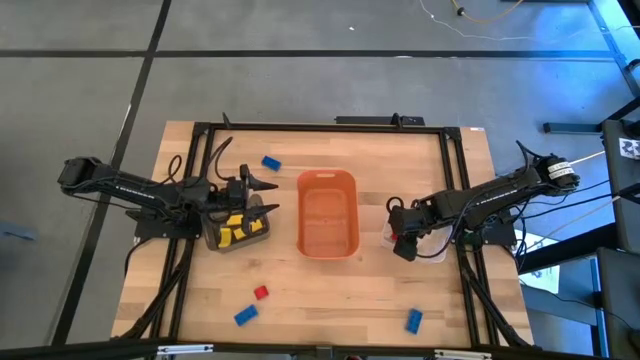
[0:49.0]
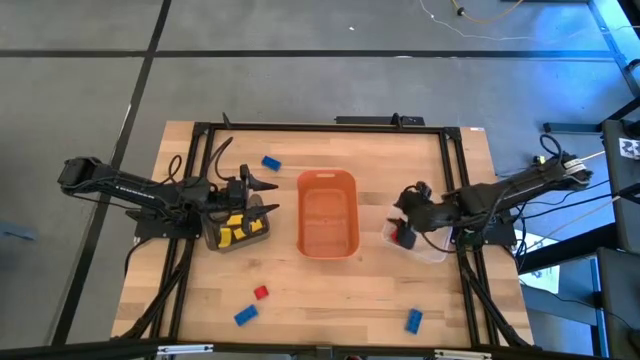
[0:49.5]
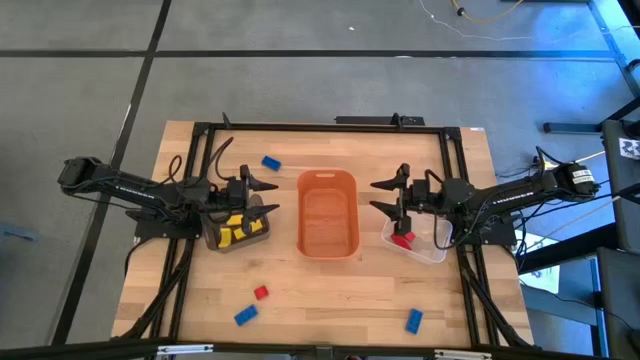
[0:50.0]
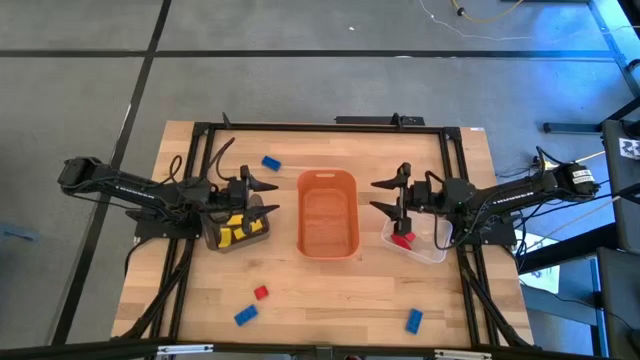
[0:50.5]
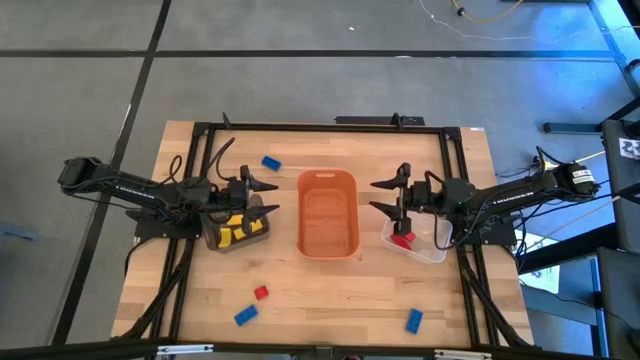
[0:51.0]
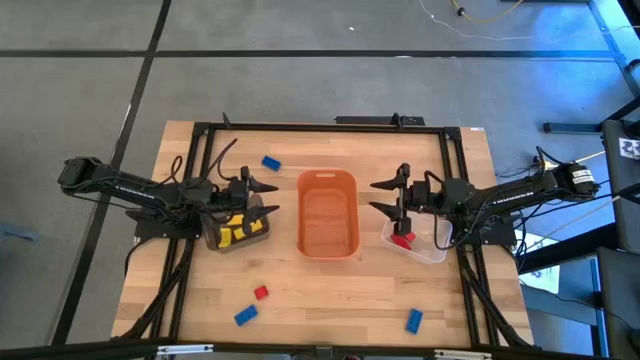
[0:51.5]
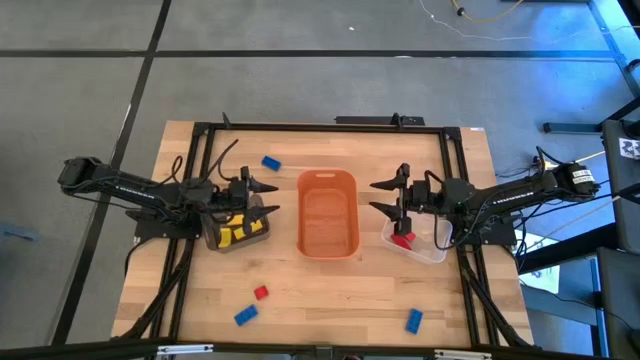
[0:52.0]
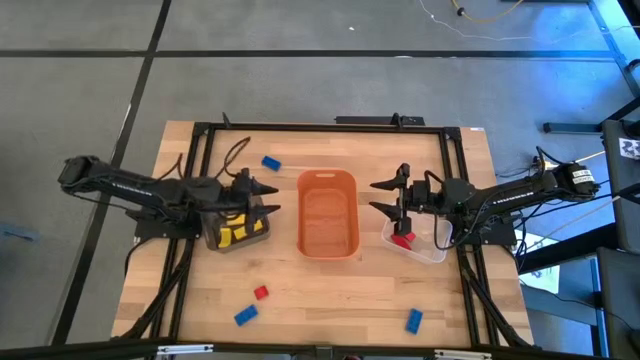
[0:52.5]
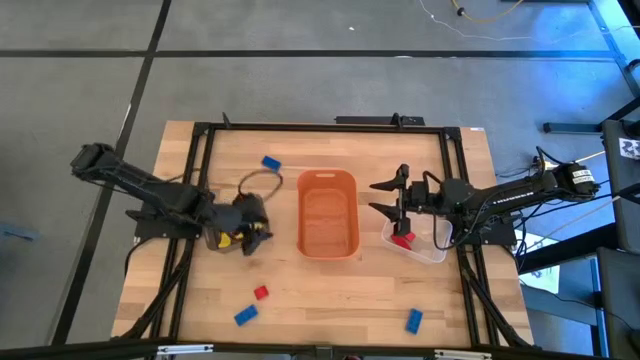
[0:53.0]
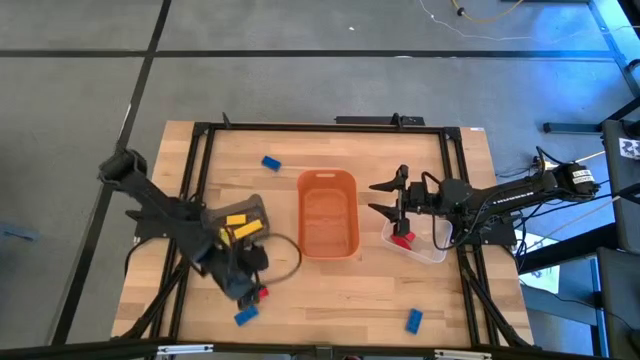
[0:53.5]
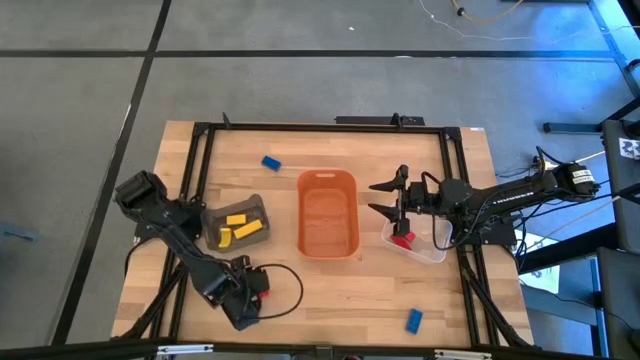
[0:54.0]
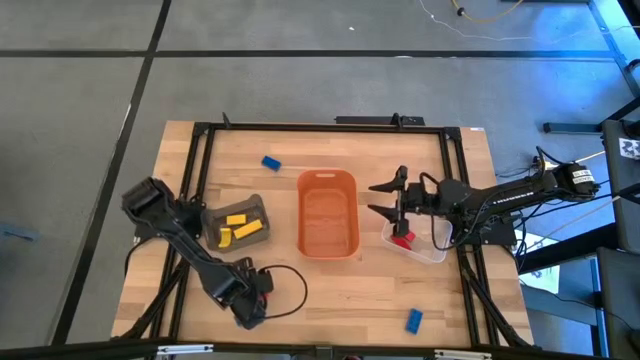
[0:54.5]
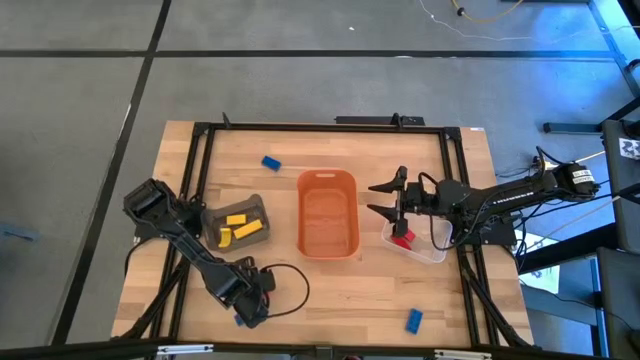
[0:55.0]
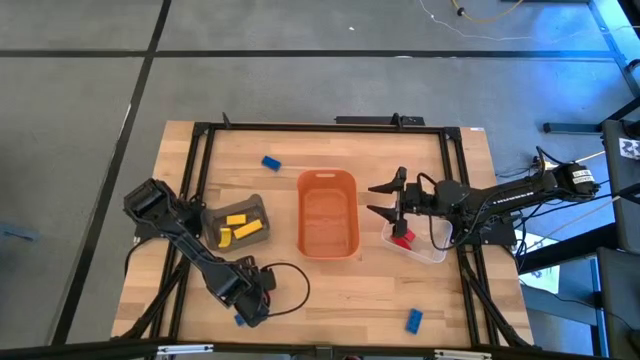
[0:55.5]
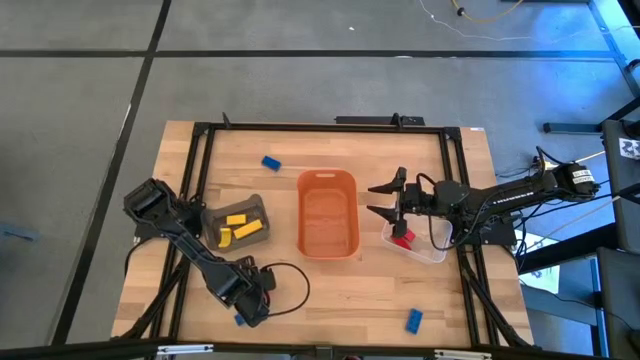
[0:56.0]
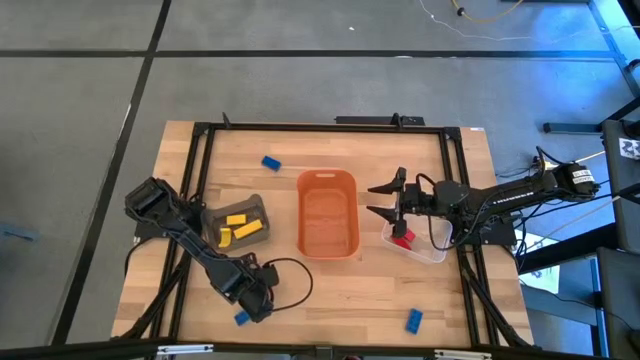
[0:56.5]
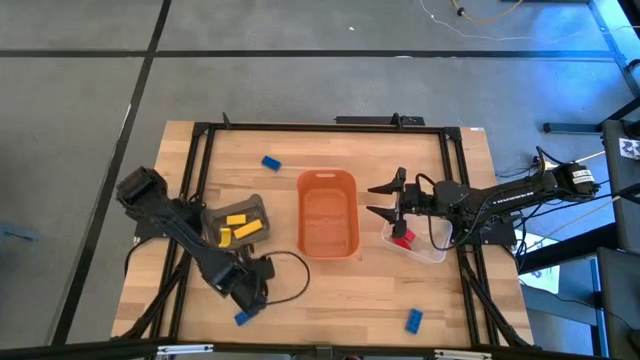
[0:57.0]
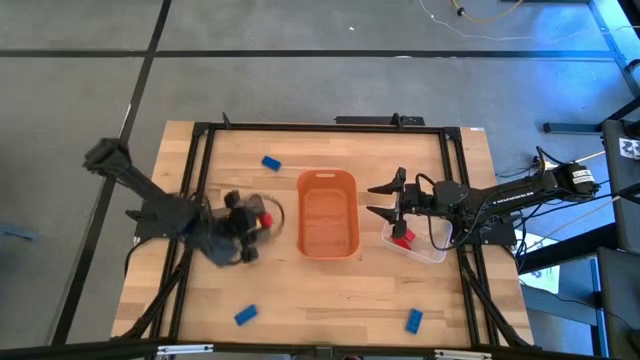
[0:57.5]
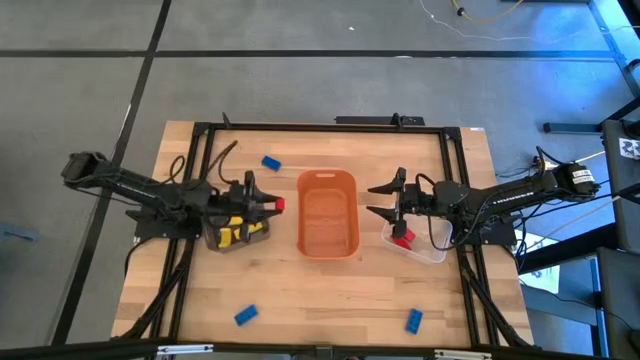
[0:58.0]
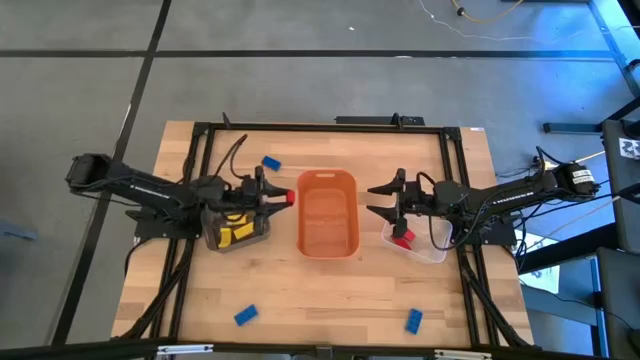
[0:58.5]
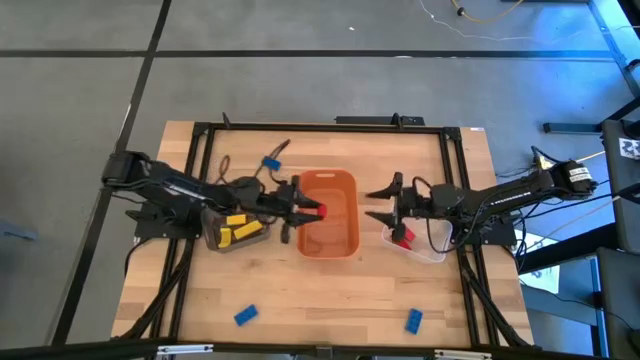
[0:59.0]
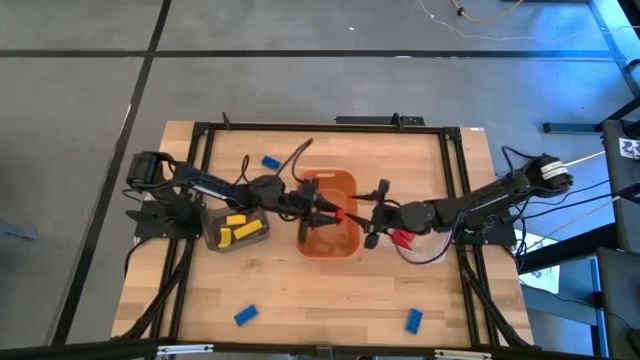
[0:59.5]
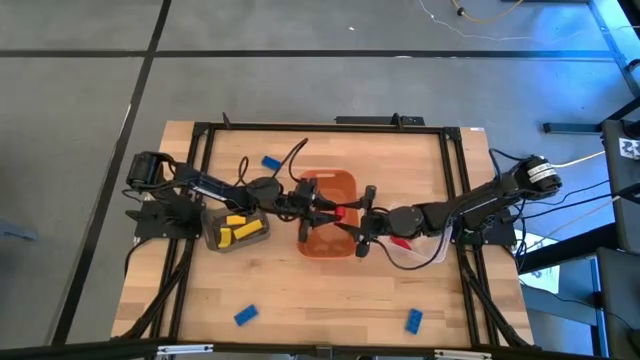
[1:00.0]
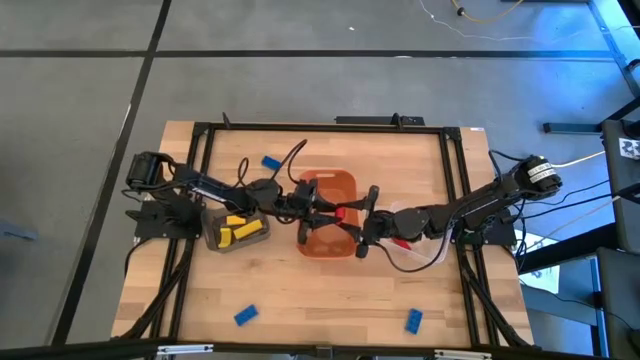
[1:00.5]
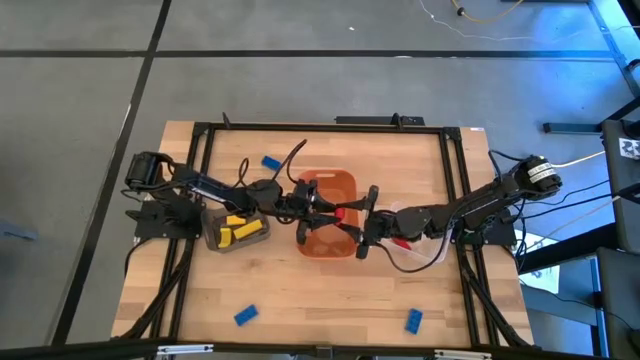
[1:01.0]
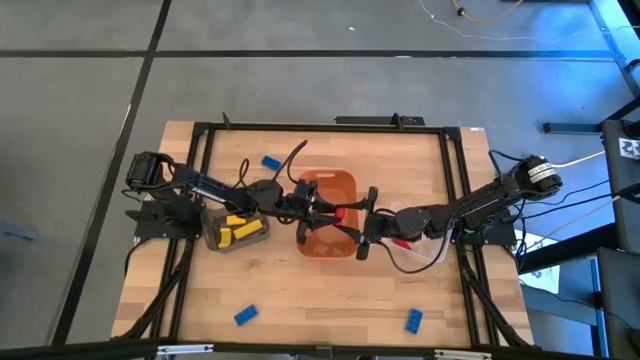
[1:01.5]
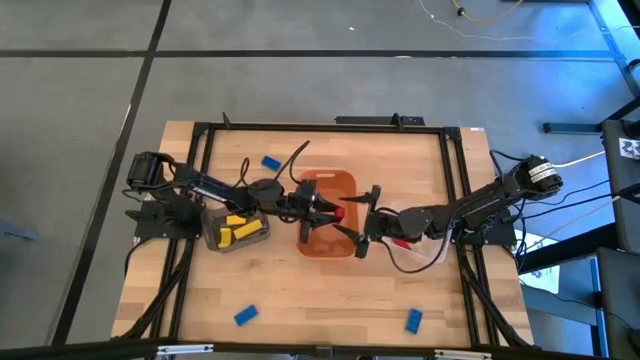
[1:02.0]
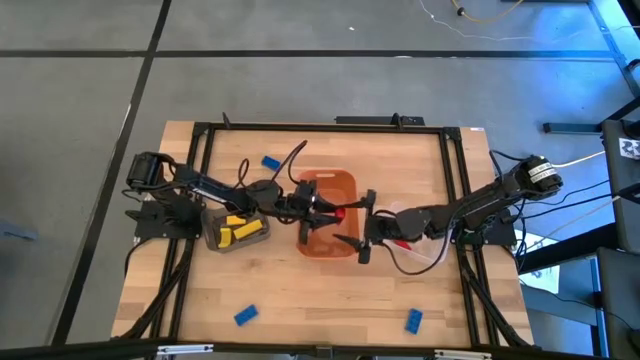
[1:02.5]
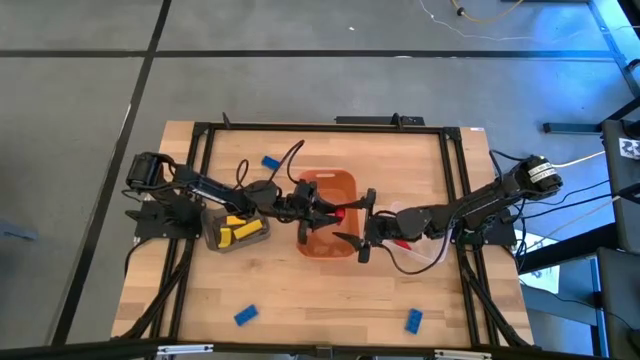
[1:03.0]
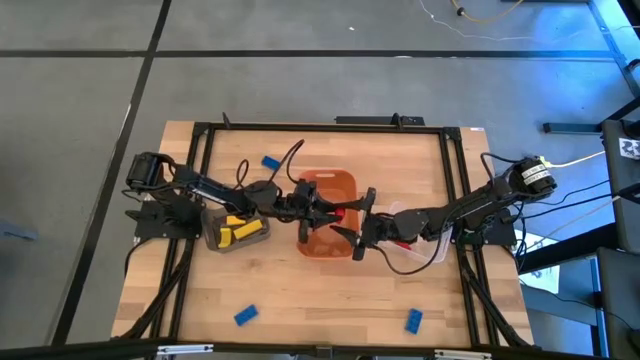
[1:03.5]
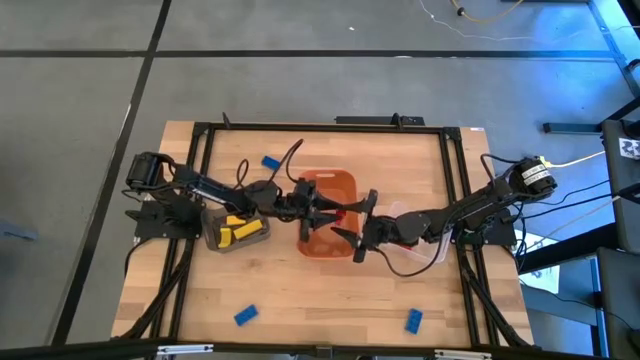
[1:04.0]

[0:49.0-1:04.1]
Task: Sort & place blocks by color
Put the red block into the transparent bin

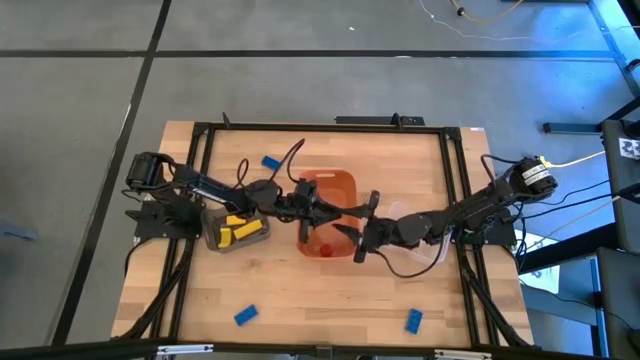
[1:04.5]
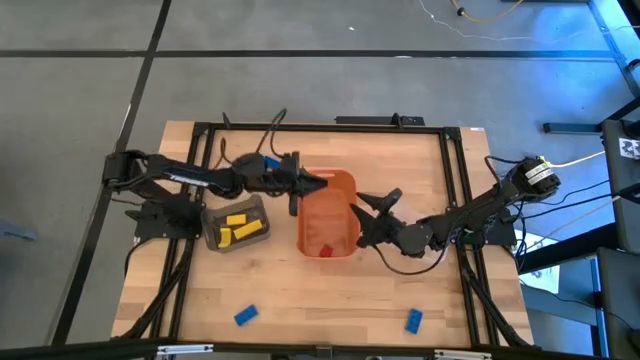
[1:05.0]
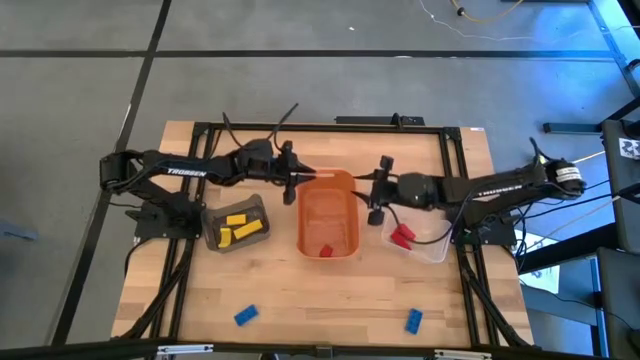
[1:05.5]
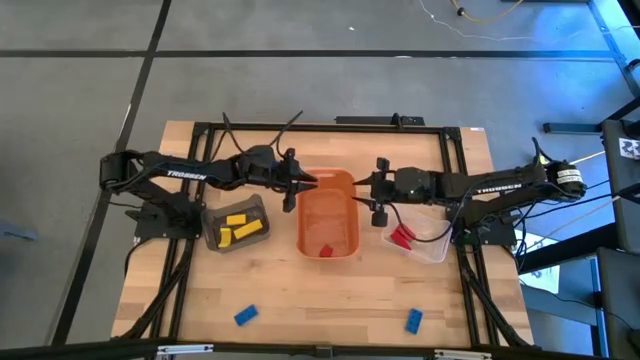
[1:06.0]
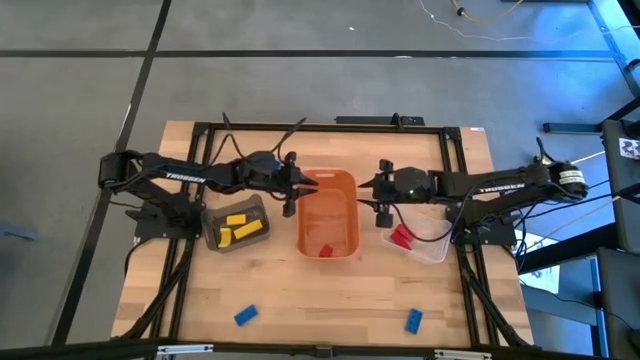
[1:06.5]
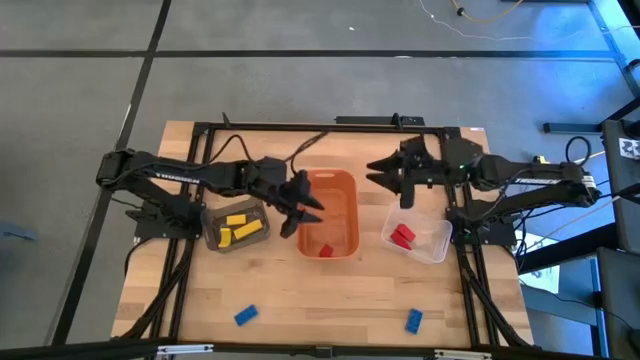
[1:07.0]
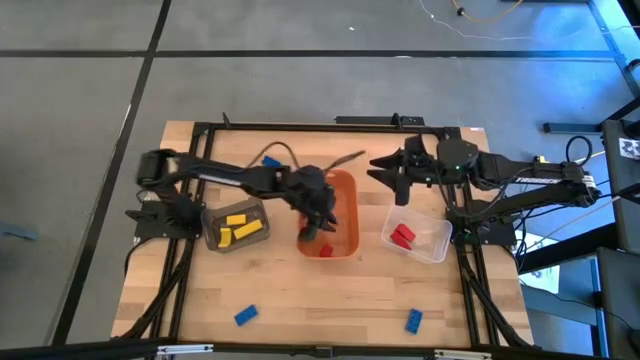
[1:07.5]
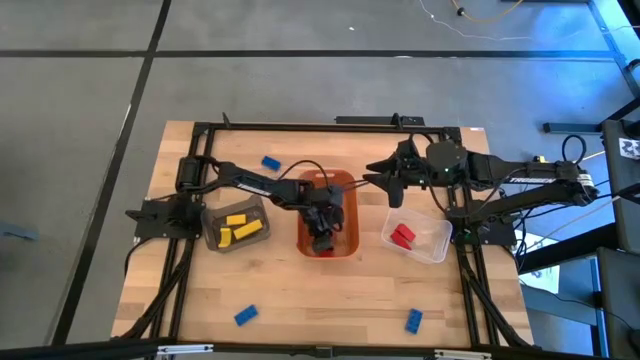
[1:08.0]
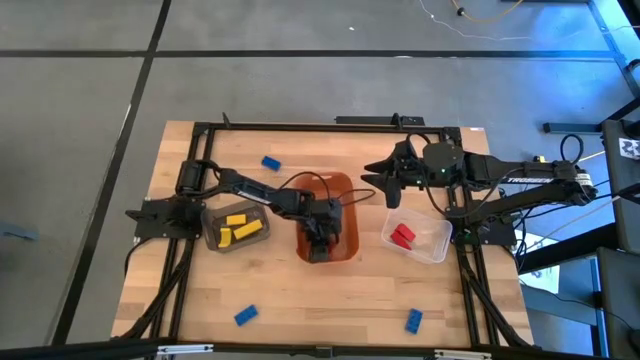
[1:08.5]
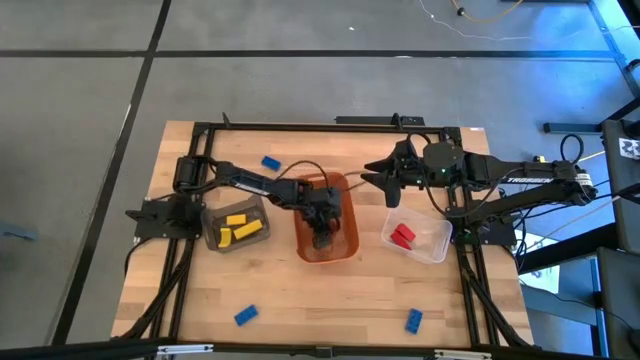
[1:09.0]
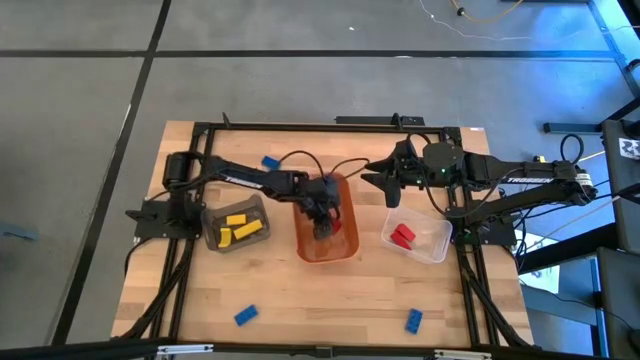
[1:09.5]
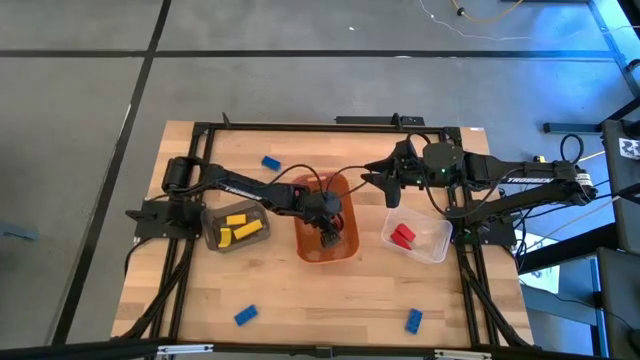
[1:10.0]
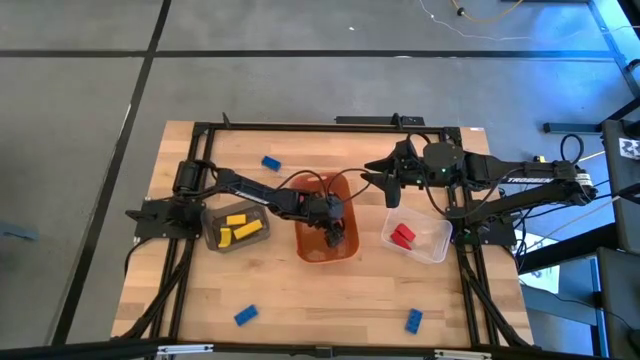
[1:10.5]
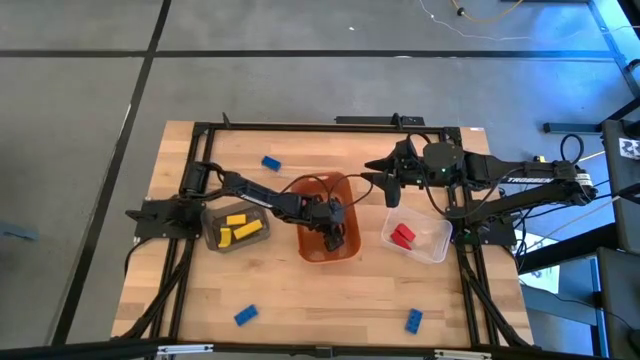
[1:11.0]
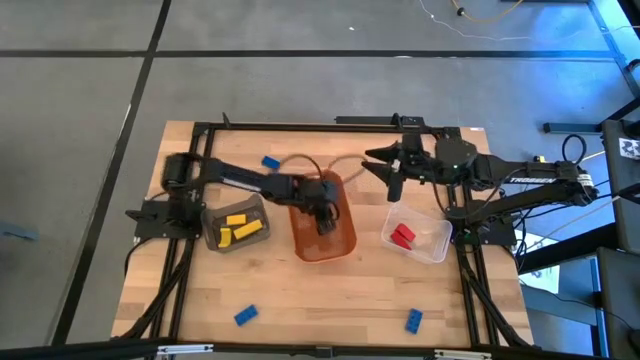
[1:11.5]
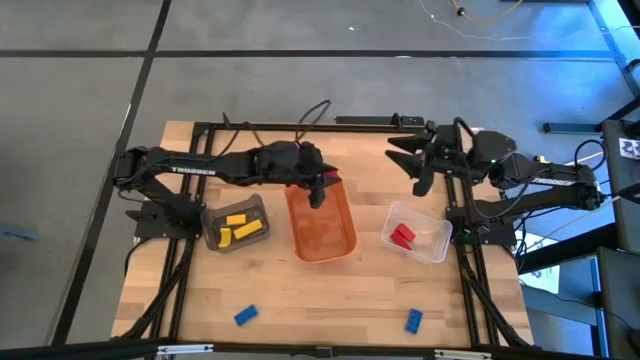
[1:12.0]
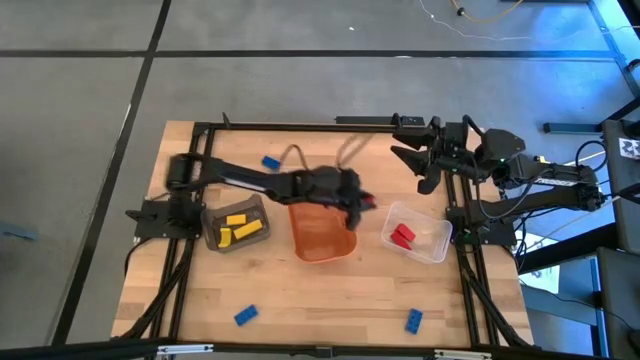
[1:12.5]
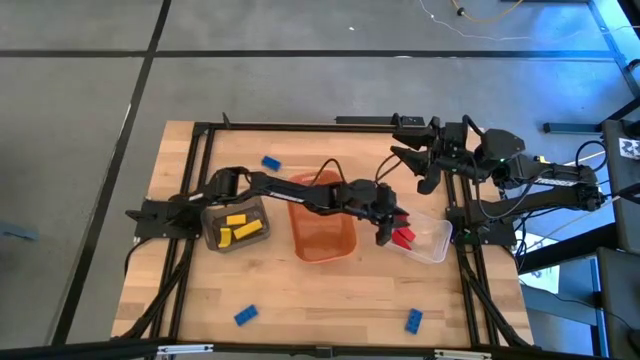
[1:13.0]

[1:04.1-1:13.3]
Put the red block into the transparent bin
